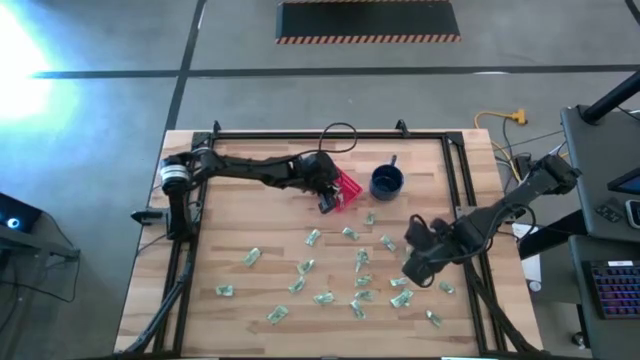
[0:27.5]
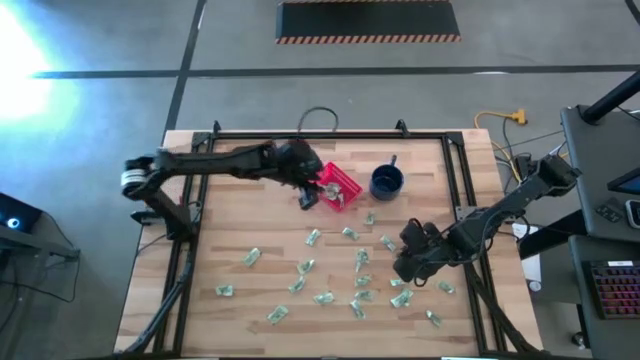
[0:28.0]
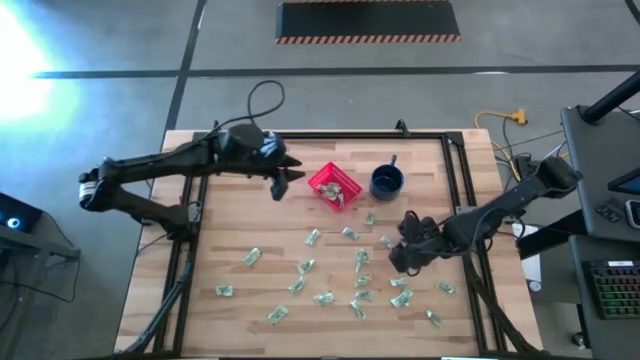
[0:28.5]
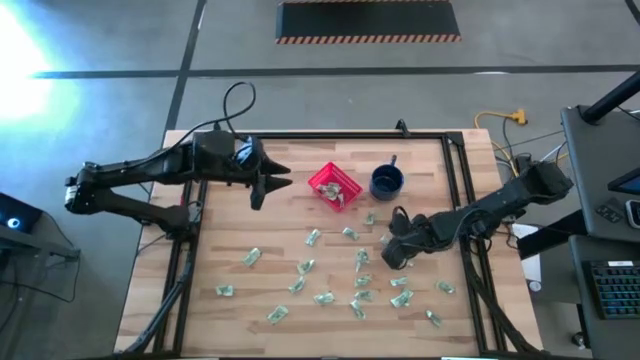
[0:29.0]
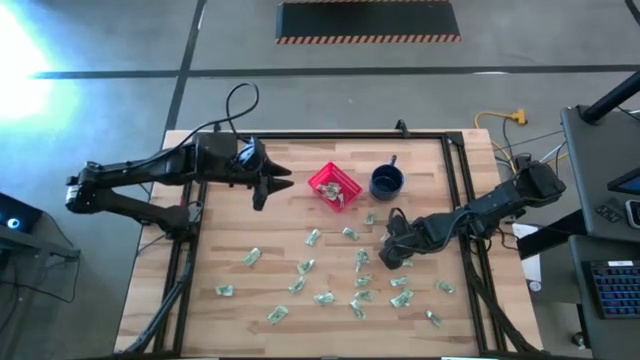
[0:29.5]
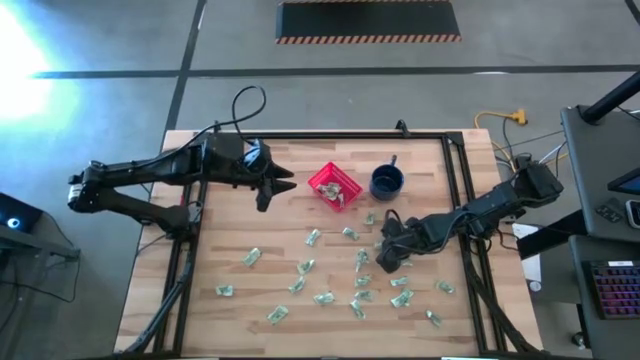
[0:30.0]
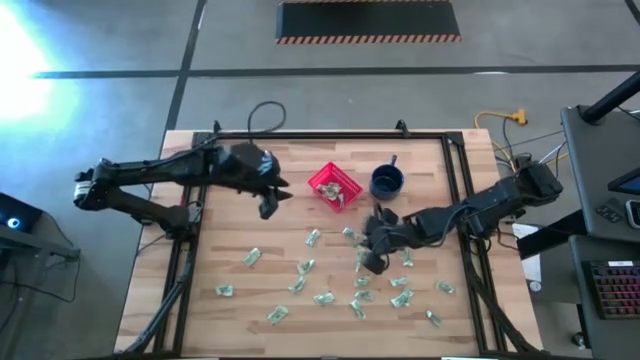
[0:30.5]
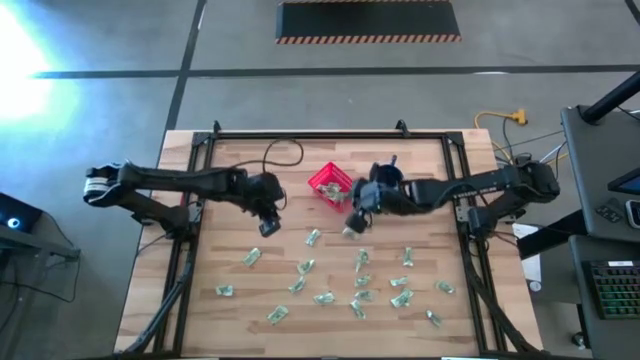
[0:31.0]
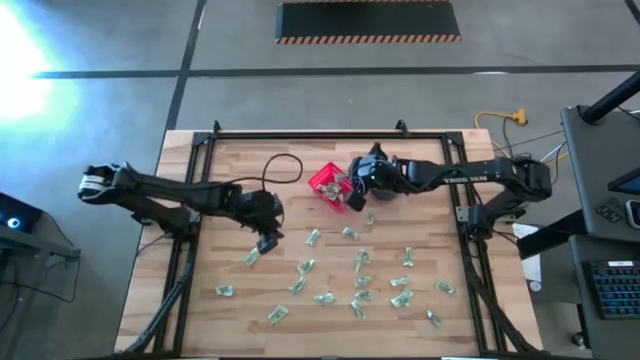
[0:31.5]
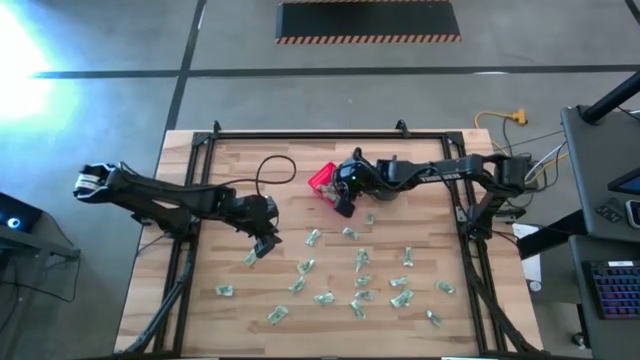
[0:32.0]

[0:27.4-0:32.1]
Task: Pick and place Stevia / Truvia into bins
Put the stevia packet into the red basket

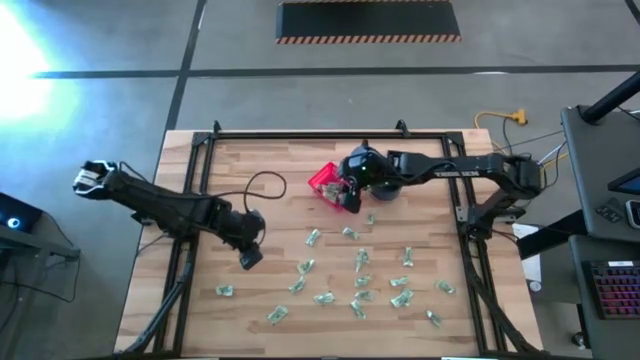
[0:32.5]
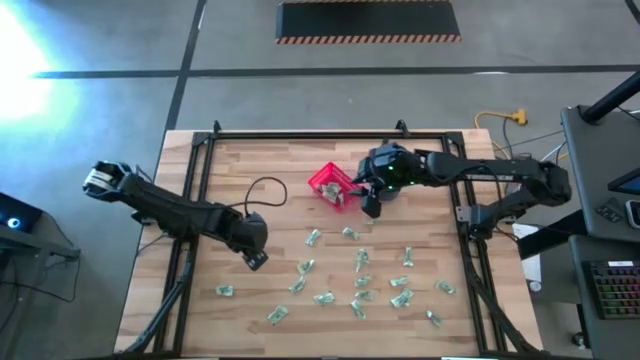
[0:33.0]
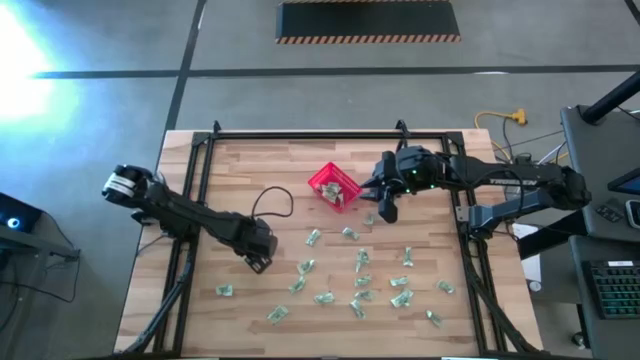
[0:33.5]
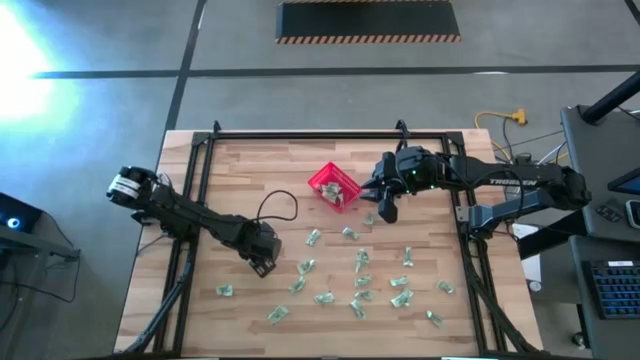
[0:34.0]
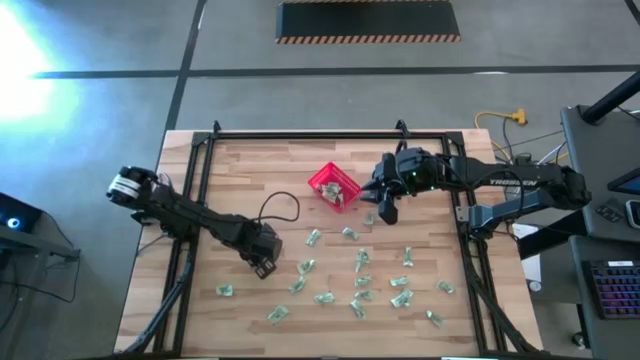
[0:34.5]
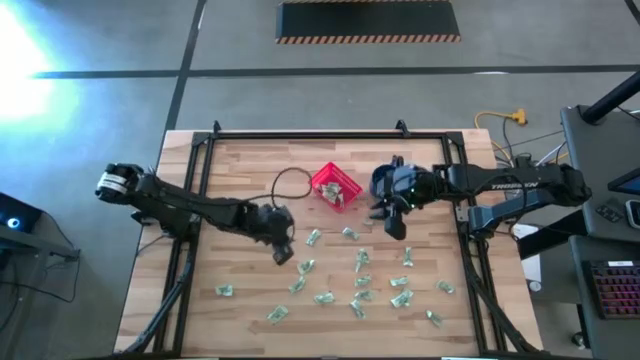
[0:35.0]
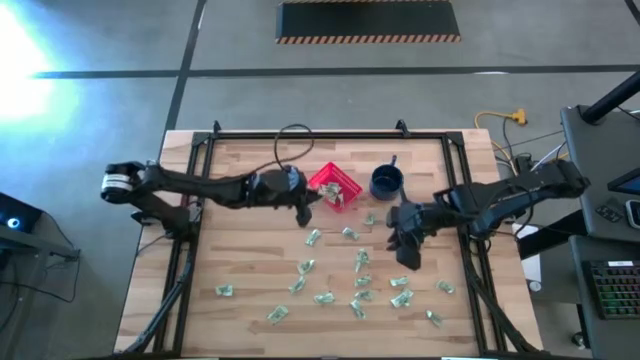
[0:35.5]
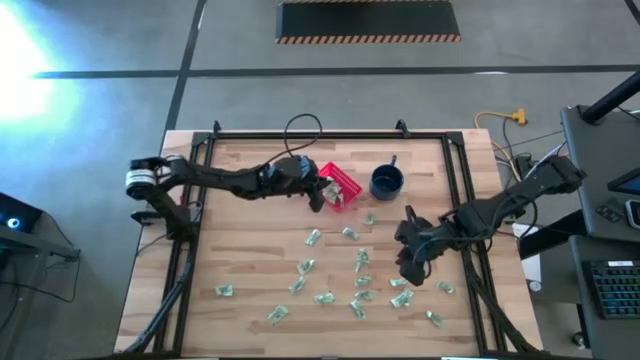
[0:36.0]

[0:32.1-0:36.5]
Put the stevia packet into the red basket

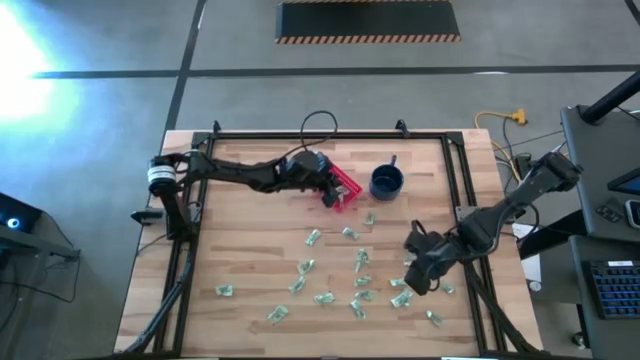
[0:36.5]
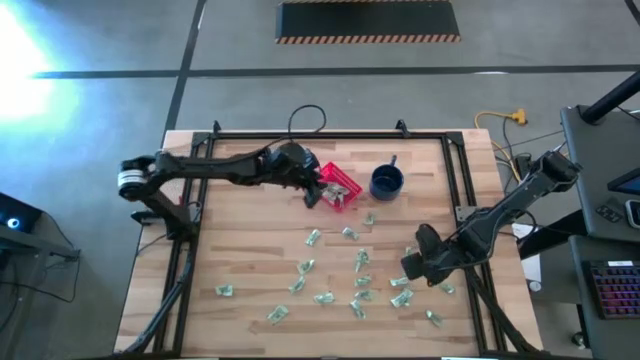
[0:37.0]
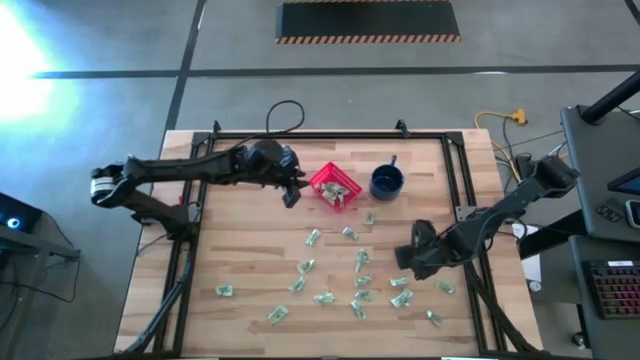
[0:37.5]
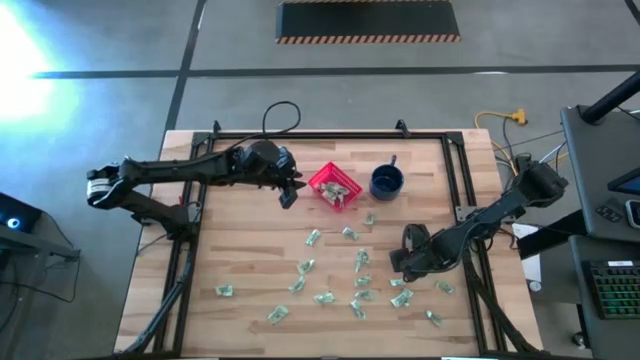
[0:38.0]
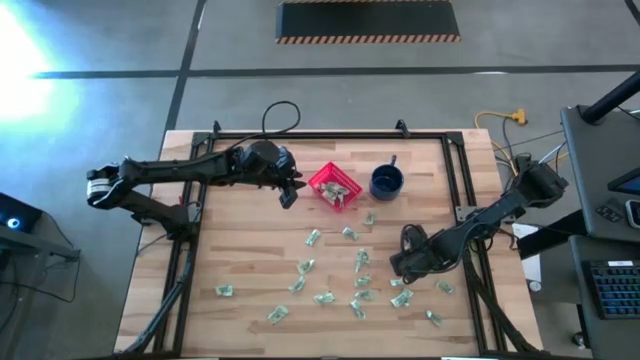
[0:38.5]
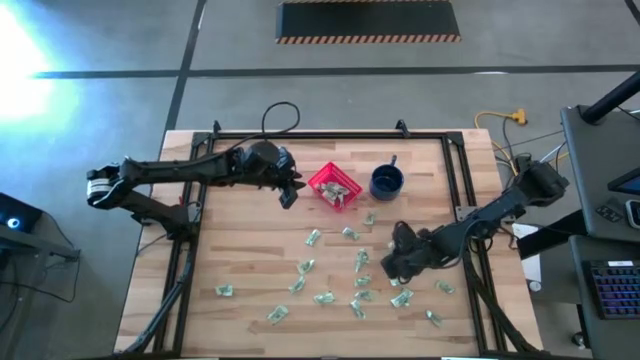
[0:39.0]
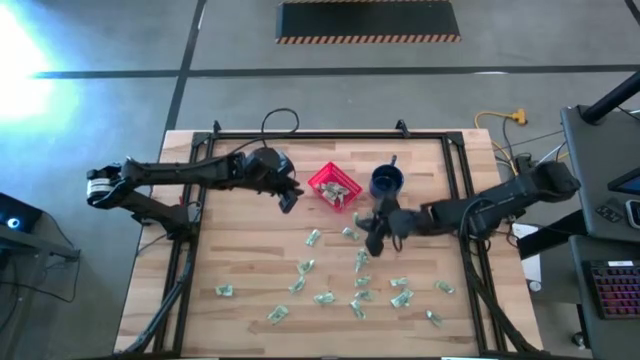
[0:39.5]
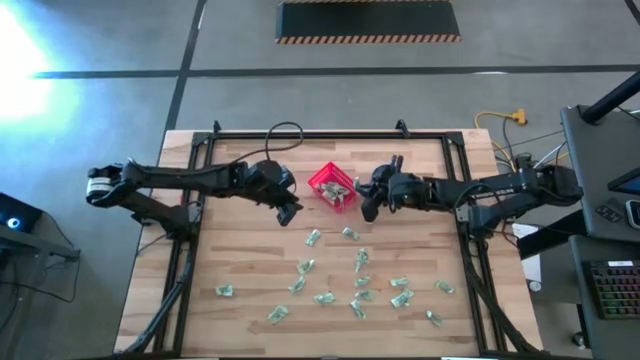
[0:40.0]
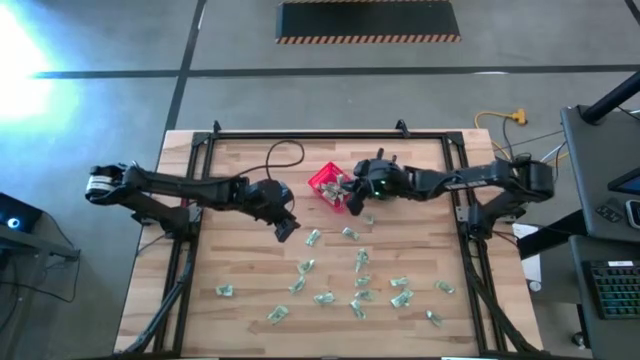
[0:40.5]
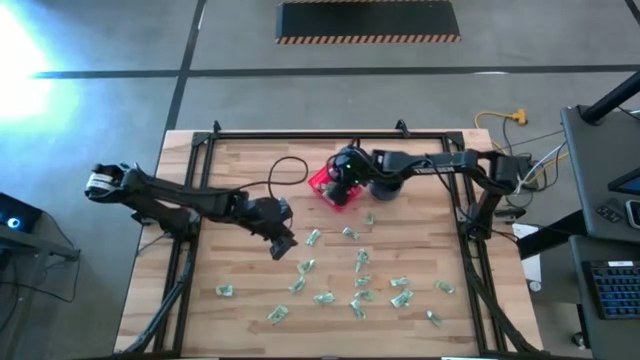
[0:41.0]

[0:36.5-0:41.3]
Put the stevia packet into the red basket

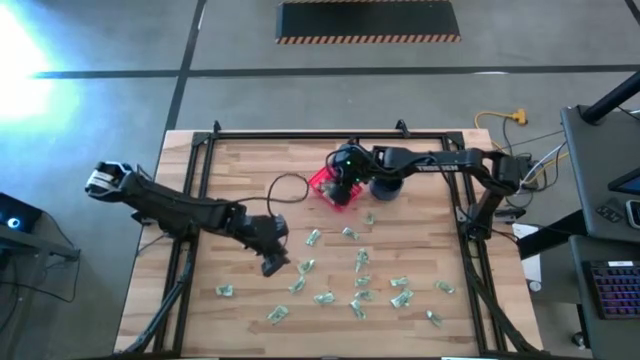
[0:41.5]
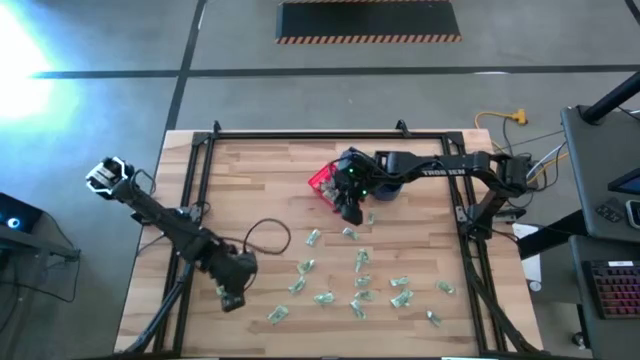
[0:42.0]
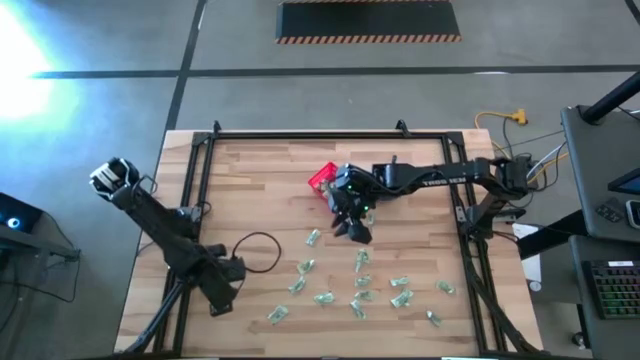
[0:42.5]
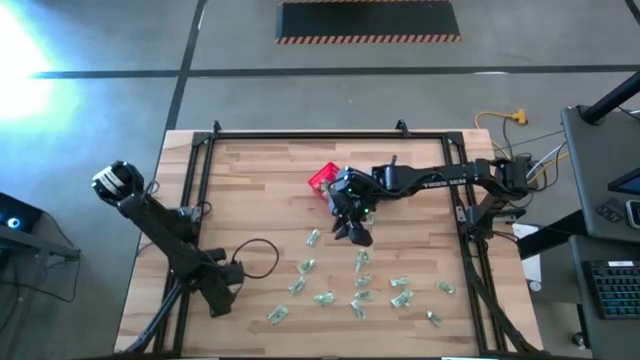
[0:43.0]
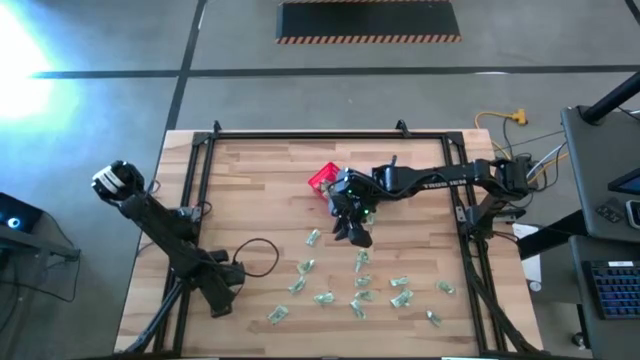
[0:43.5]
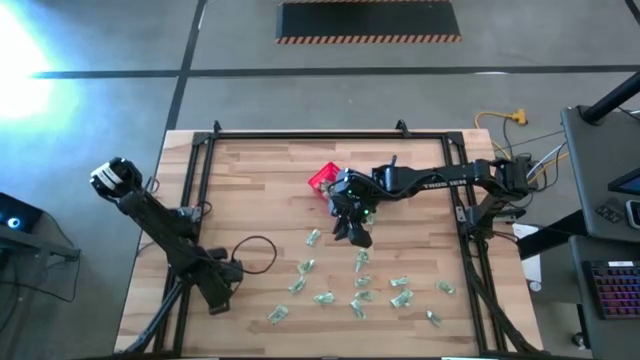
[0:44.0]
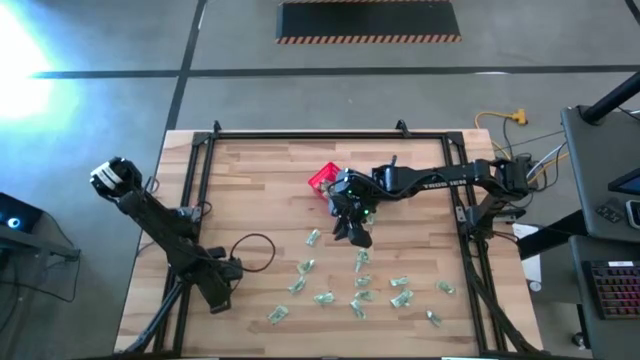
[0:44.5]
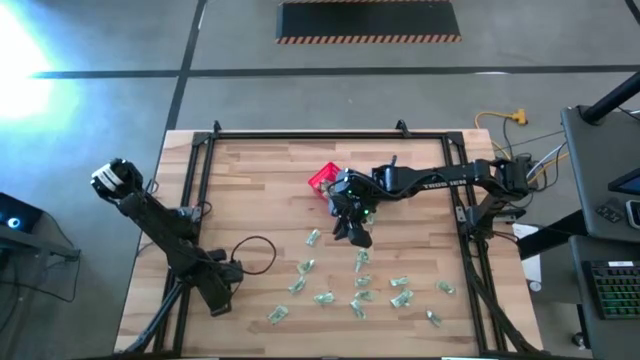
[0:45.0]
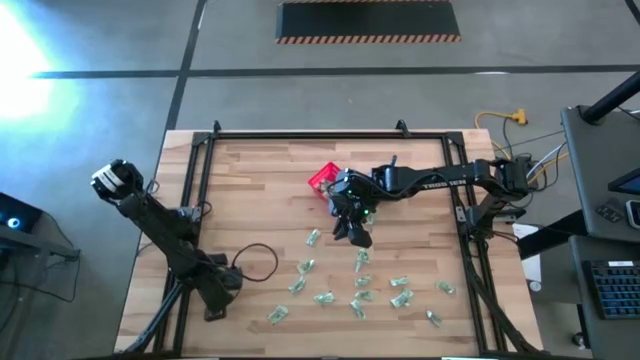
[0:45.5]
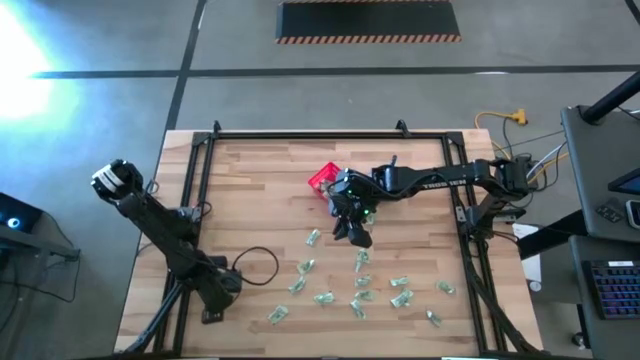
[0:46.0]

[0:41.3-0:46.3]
Put the stevia packet into the red basket

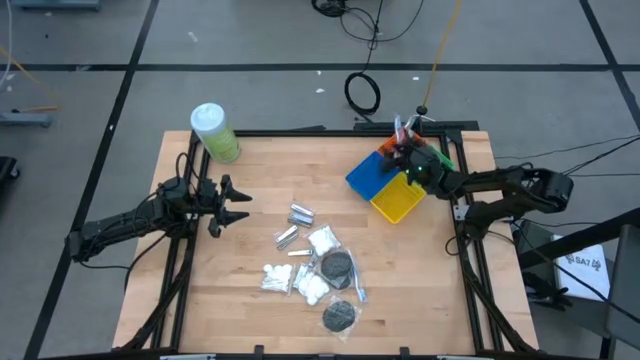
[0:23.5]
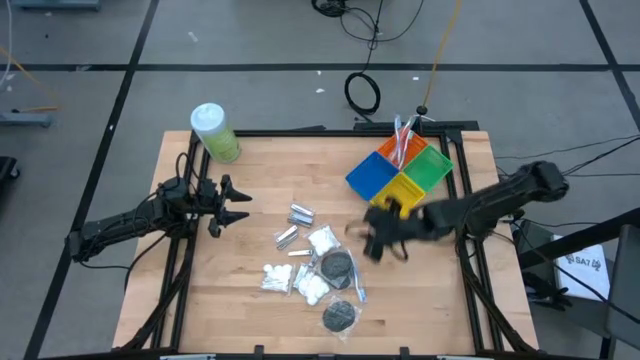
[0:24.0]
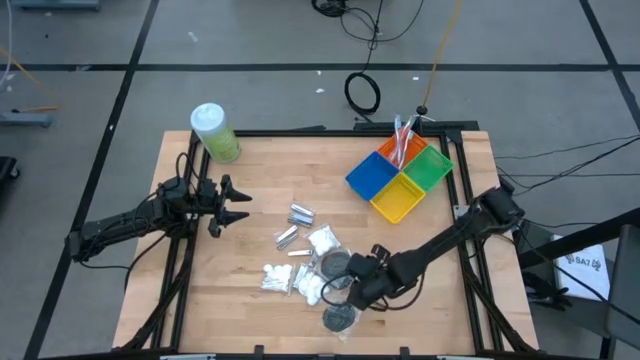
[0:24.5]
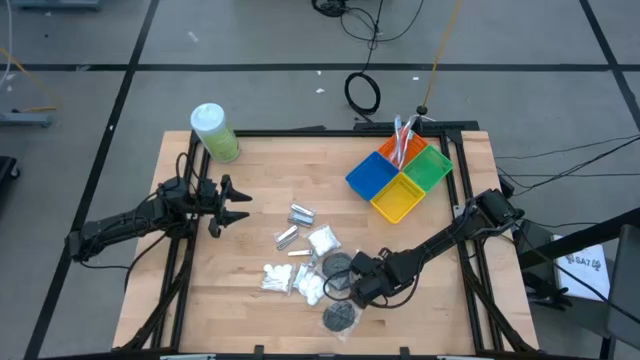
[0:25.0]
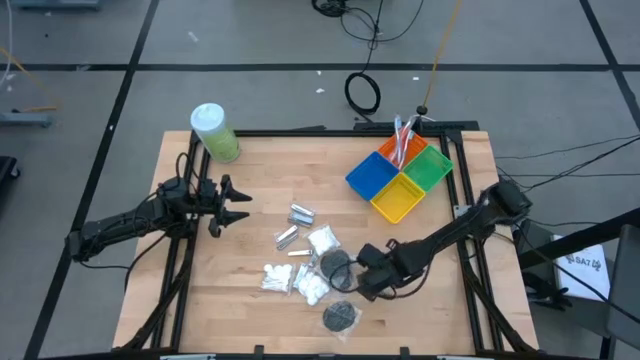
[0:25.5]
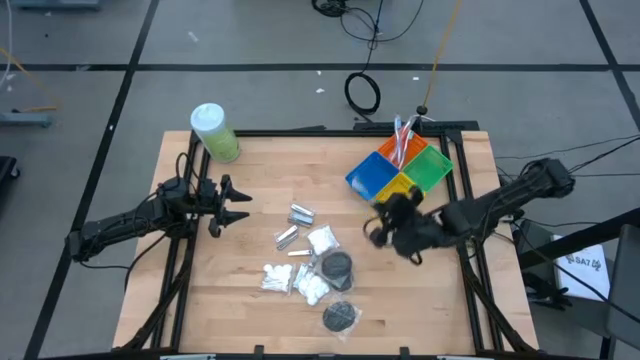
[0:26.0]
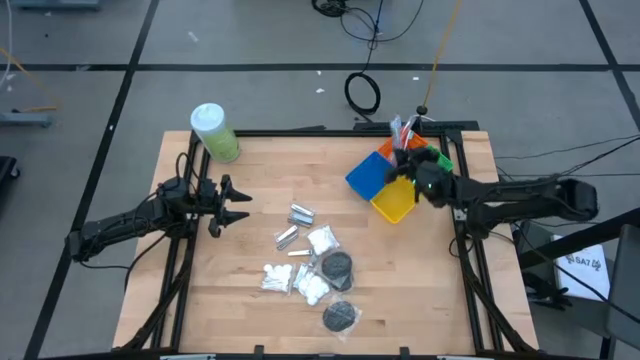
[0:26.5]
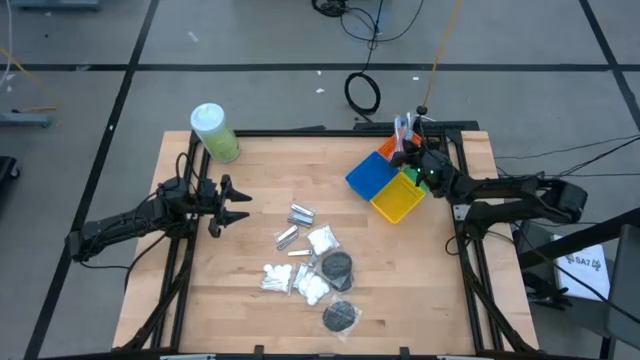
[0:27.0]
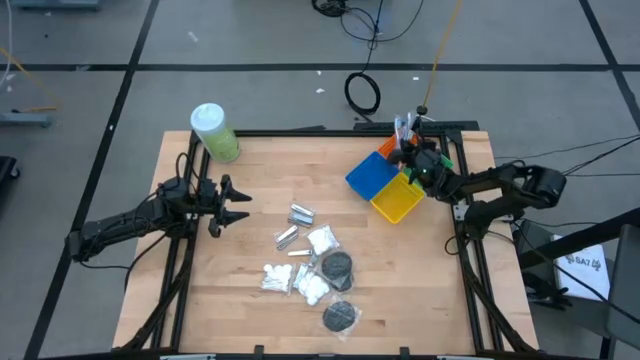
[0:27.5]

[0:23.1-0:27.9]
Task: Pick & Place Travel size toiletries
Put the blue toothbrush into the orange bin
